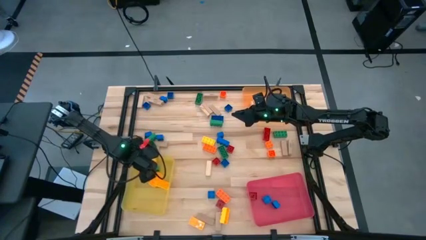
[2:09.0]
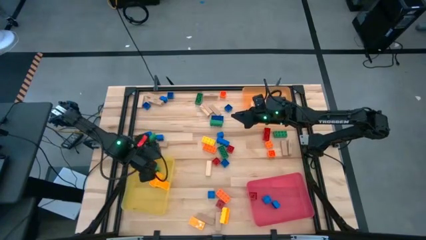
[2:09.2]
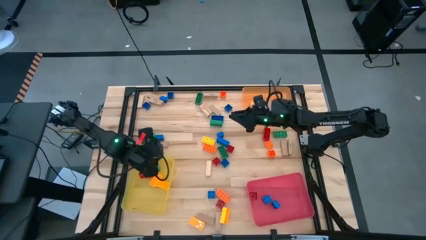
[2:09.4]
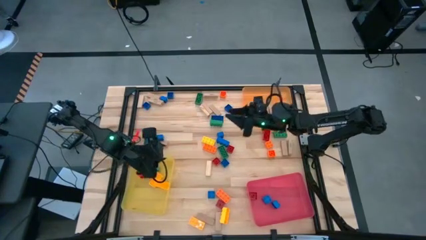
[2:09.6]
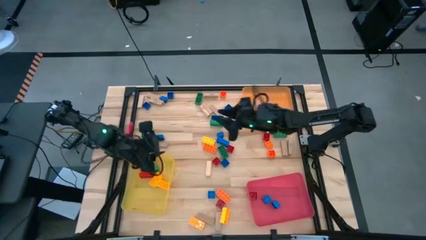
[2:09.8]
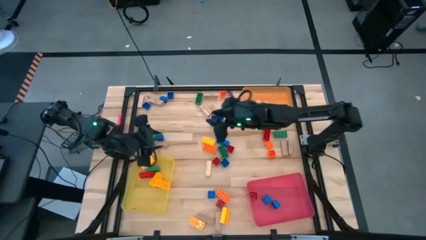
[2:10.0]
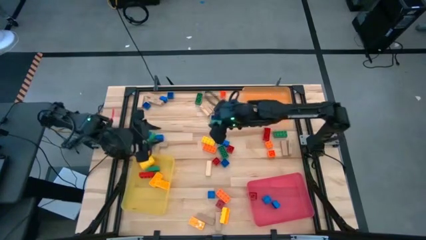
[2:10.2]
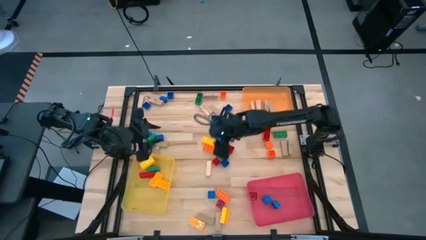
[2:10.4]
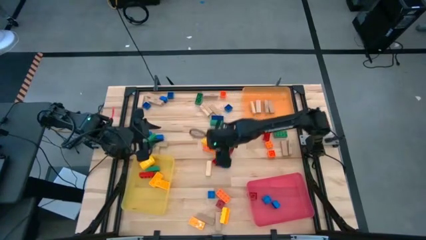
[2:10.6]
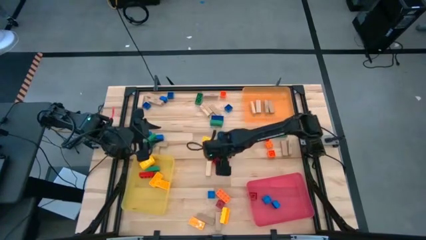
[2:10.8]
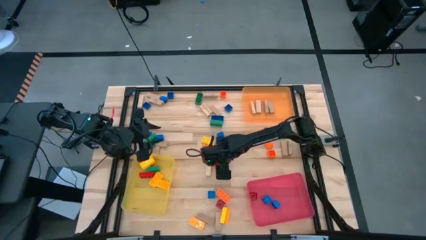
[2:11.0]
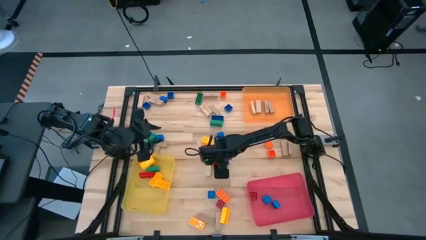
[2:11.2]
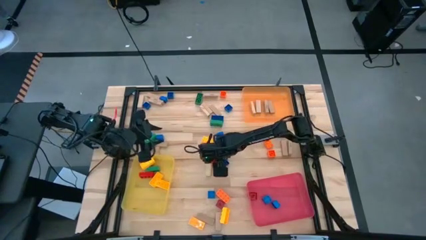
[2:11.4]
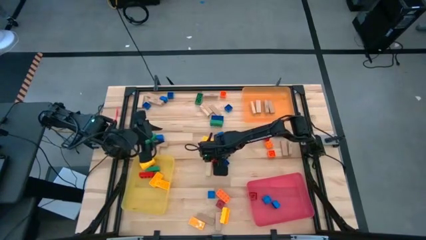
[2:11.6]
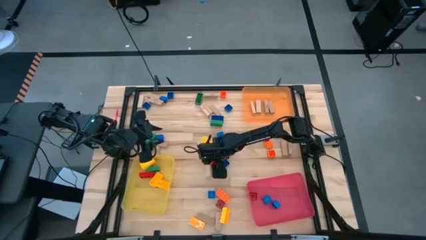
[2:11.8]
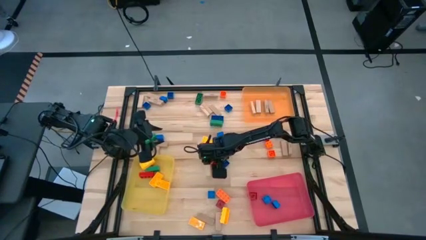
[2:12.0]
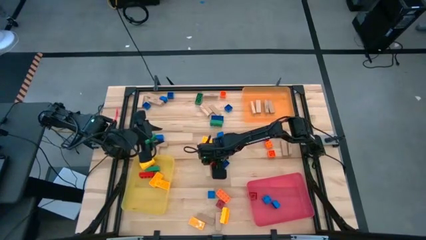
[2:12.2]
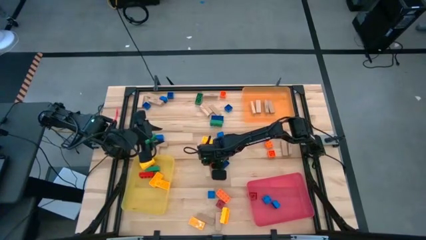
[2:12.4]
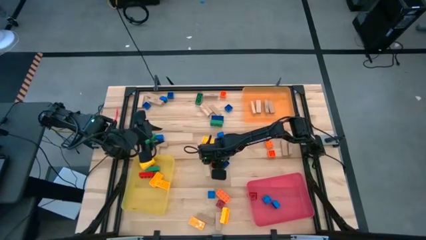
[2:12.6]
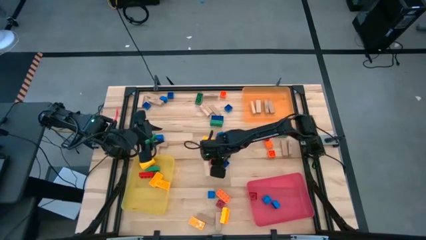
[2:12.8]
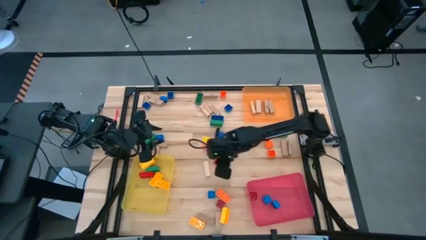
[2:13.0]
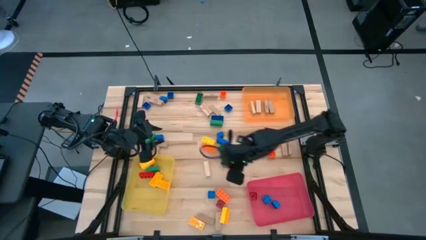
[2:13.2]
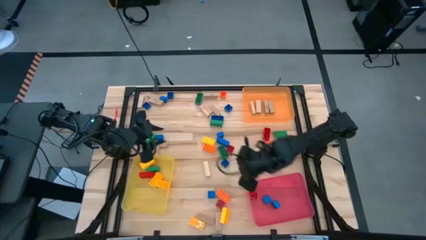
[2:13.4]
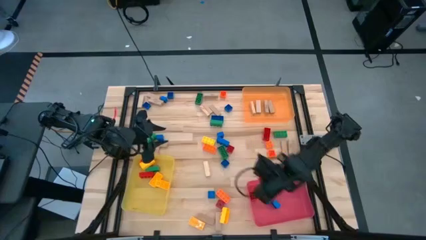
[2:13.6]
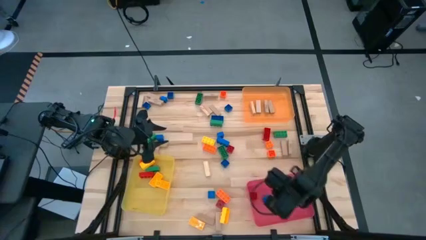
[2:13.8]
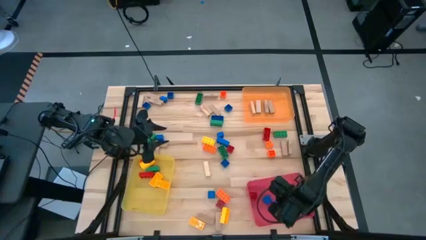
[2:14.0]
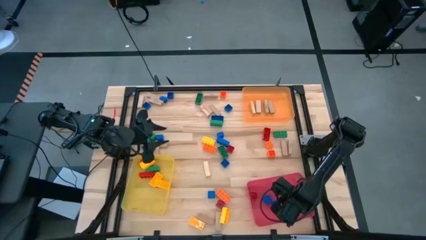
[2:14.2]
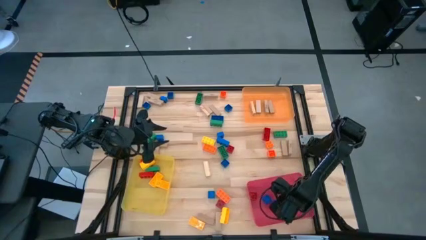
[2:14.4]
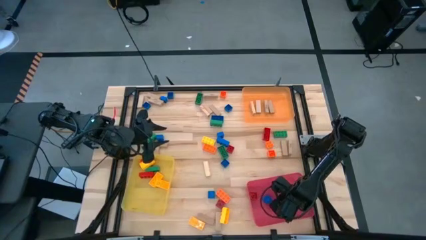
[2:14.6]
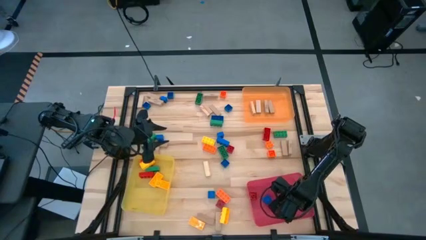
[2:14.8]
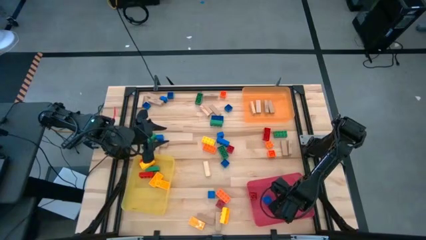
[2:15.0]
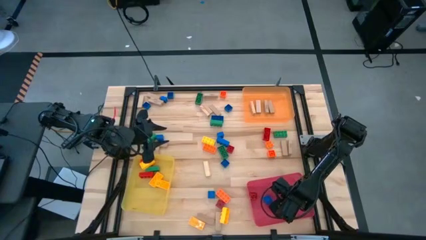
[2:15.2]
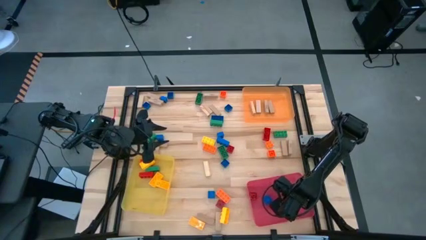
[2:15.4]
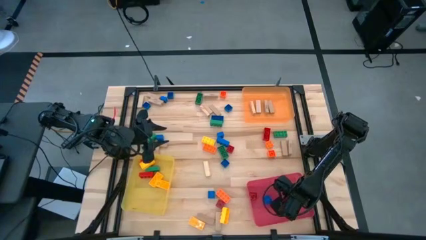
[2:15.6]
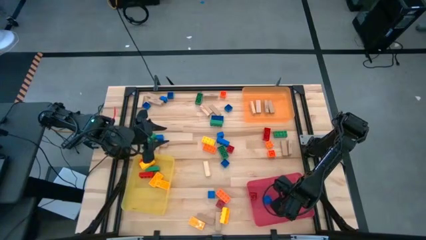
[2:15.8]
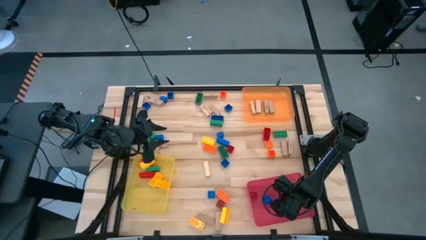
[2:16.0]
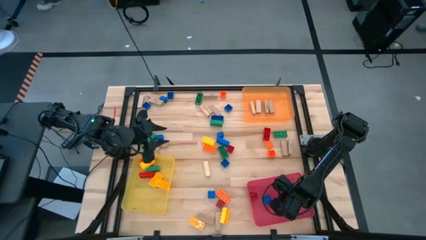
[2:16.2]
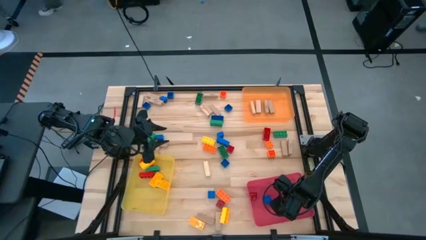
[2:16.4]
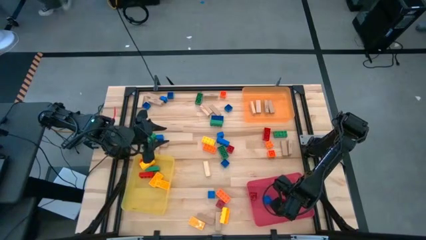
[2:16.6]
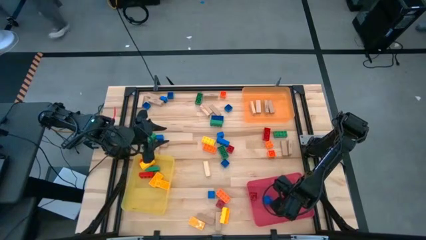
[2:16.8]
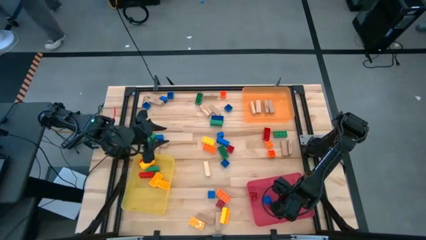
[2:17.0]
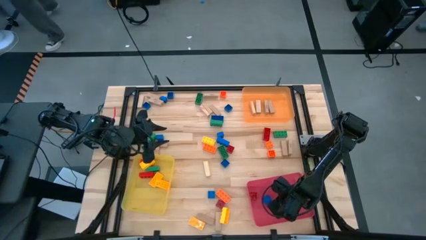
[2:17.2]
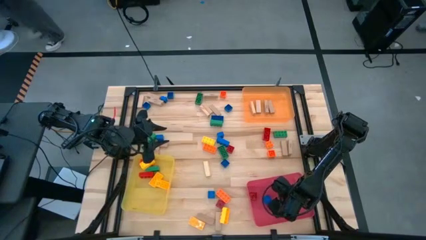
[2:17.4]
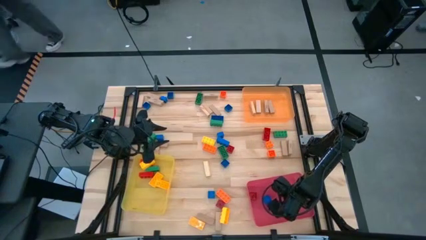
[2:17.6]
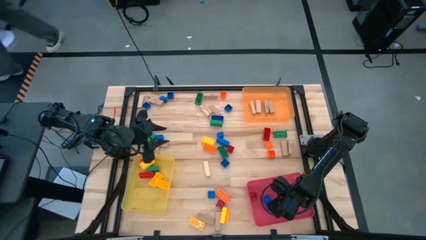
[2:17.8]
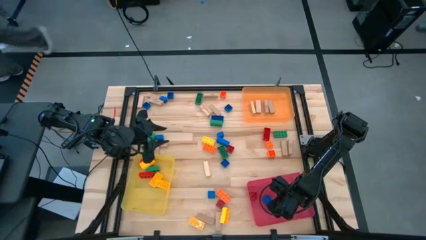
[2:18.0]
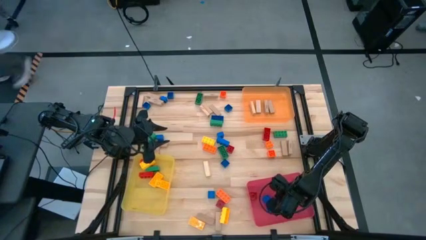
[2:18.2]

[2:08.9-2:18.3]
Task: Sort blocks by size
Put the small red game piece into the red bin

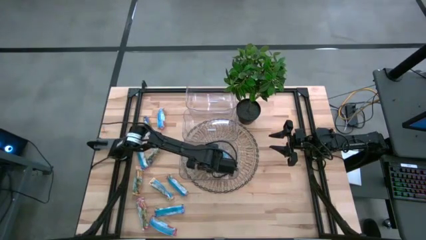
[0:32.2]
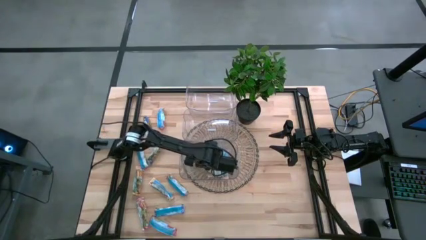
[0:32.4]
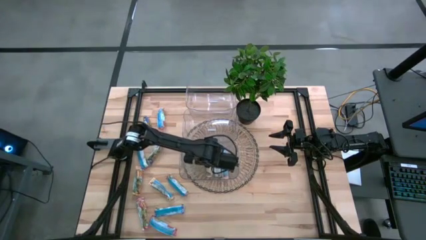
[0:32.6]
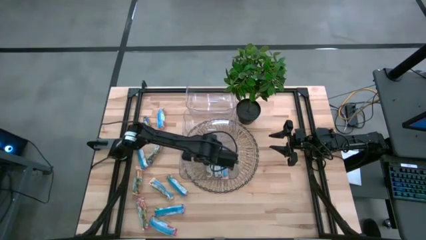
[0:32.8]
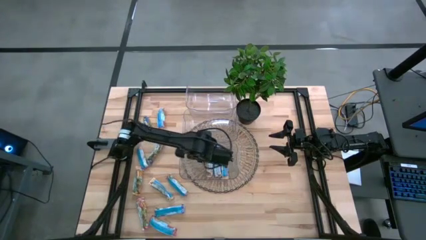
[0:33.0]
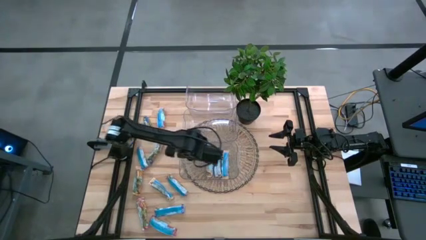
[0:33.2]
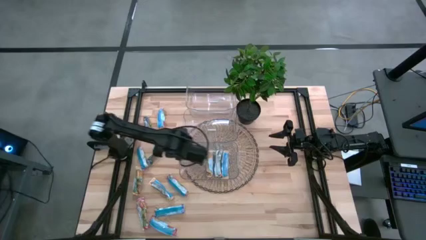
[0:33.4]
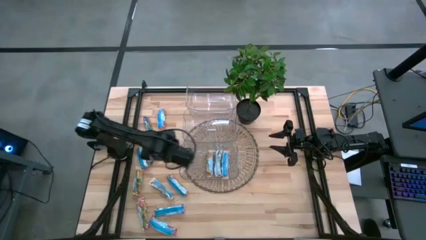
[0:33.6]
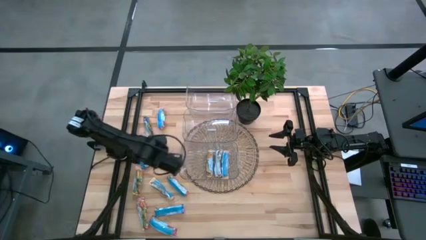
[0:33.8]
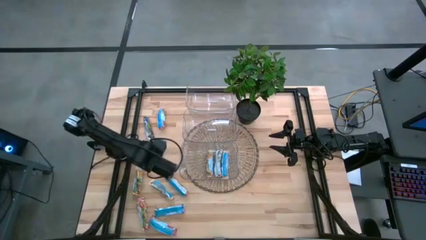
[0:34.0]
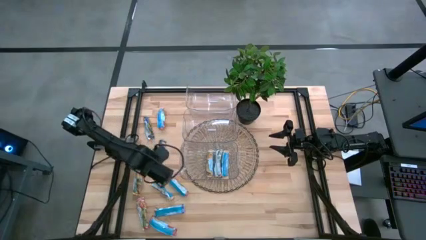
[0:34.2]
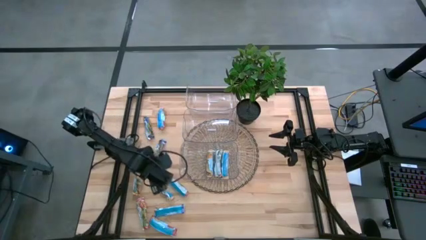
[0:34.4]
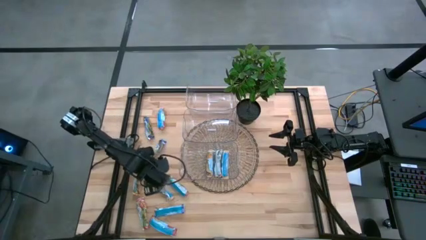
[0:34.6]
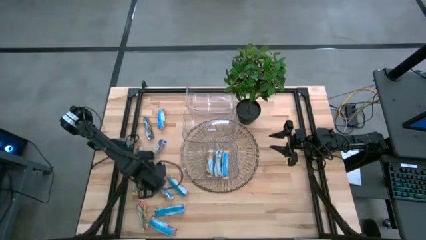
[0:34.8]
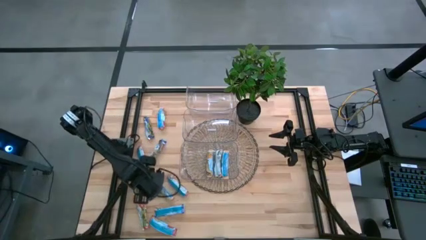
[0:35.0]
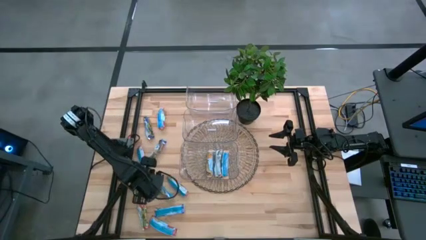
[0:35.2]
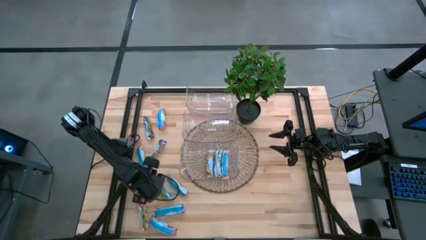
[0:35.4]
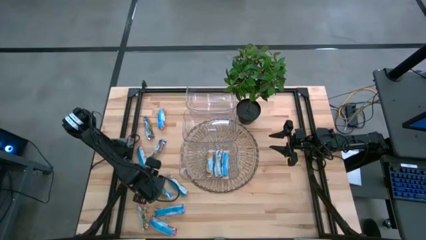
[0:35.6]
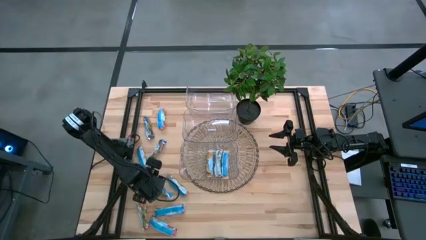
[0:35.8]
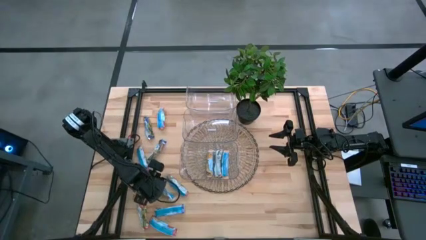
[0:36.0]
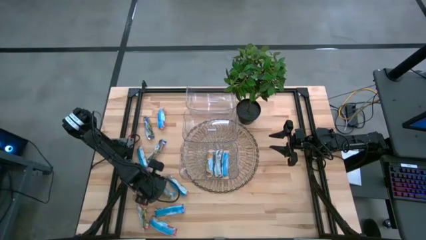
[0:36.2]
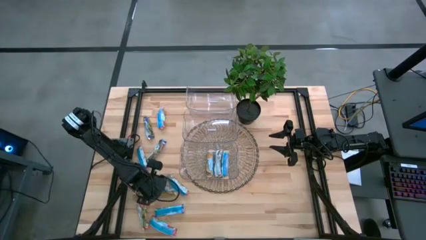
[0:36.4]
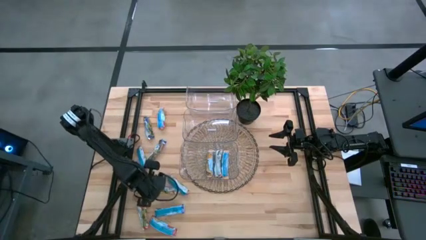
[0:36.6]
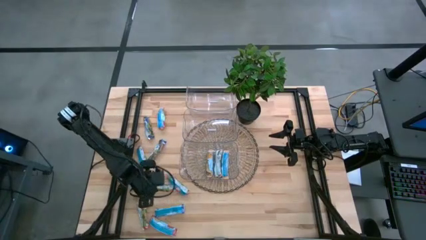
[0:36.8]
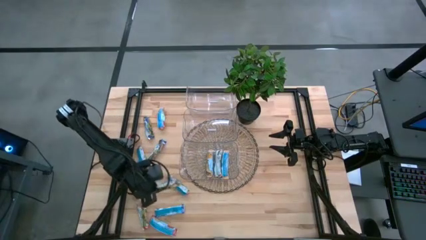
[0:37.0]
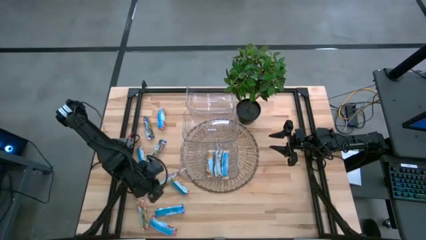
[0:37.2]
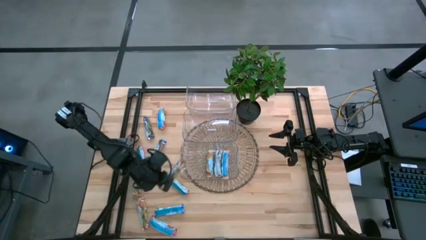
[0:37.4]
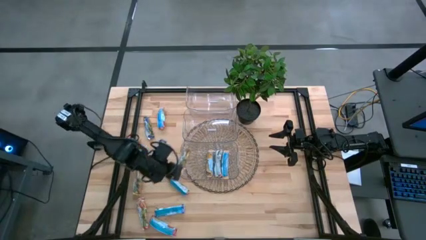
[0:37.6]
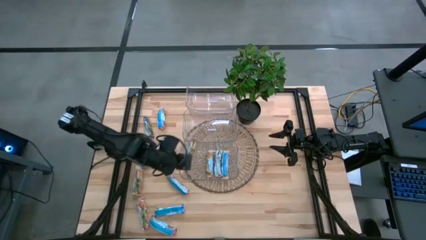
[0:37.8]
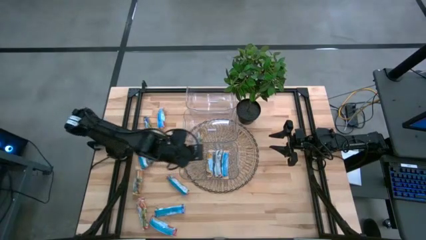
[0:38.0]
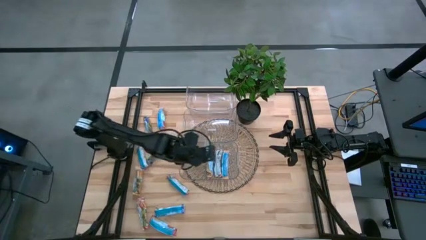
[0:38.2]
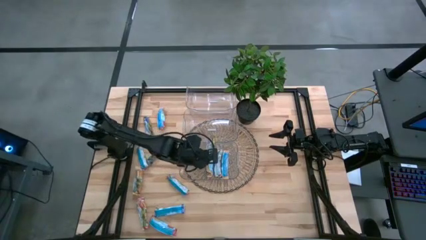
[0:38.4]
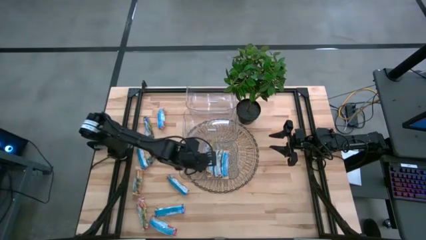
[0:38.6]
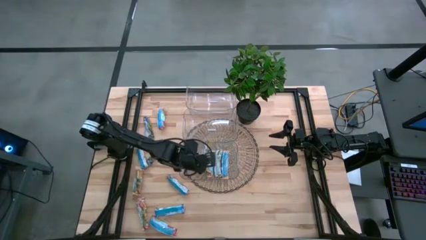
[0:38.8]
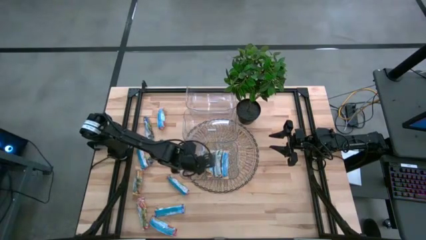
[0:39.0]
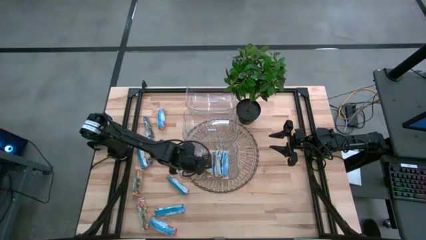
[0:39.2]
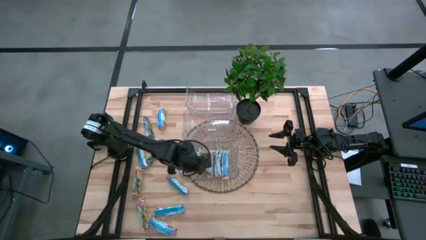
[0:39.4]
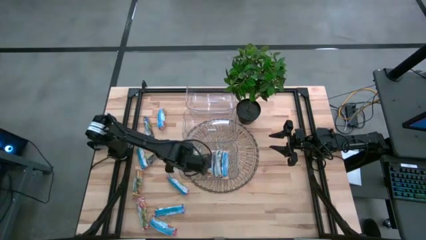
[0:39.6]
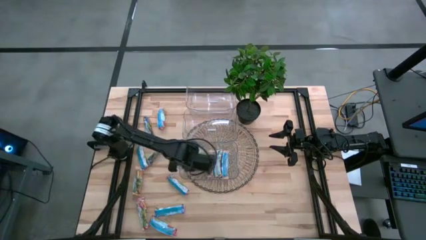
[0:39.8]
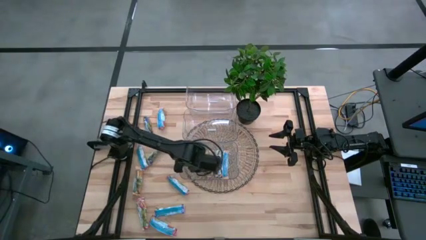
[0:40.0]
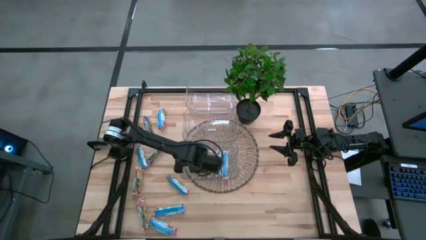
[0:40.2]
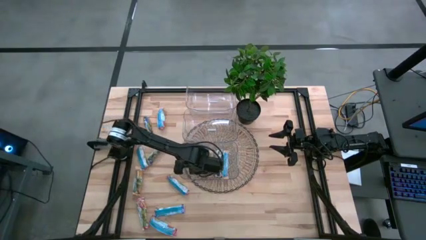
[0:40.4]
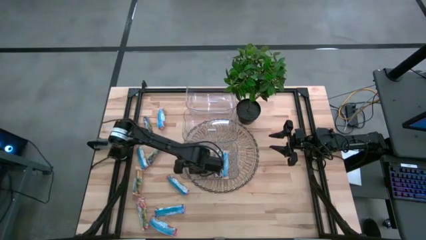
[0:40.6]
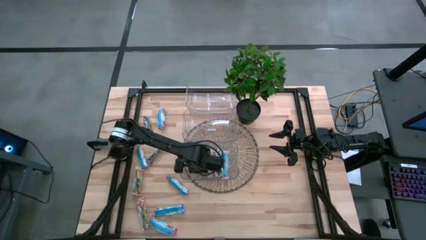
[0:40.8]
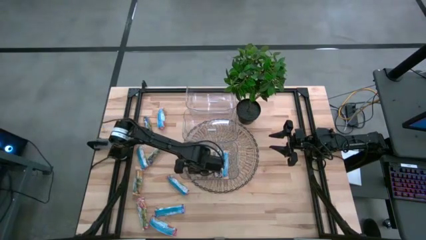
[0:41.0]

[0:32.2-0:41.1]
Task: Pick and place Granola Bars by type
Put the yellow granola bar into the bottom transparent bin
